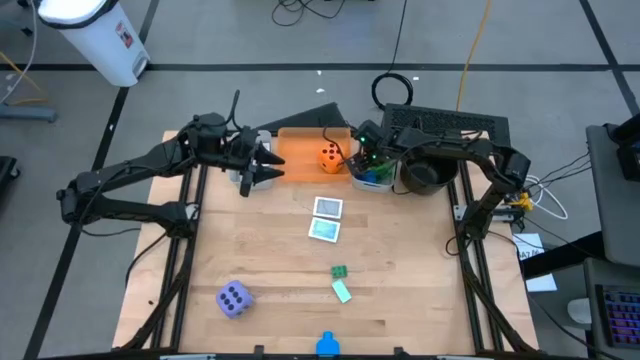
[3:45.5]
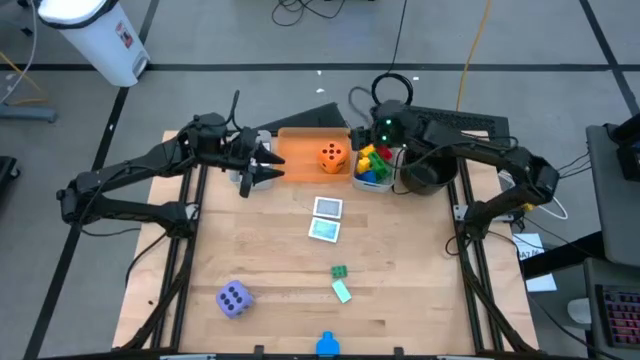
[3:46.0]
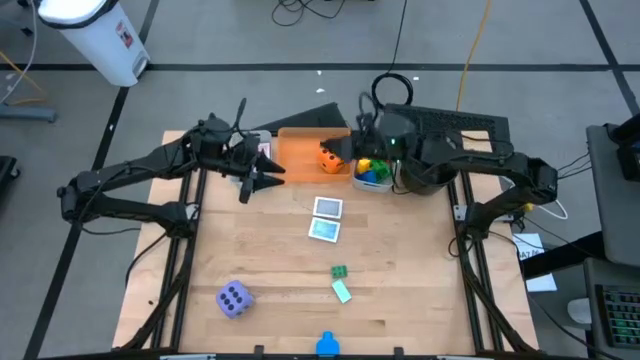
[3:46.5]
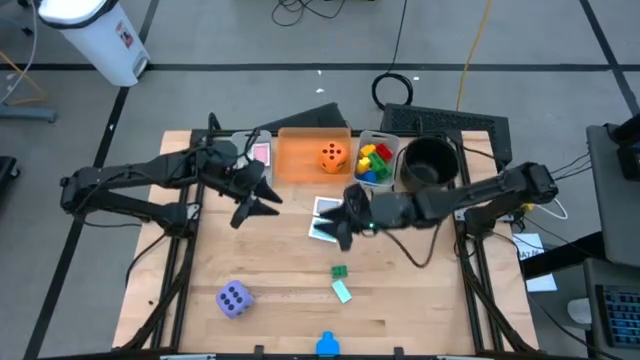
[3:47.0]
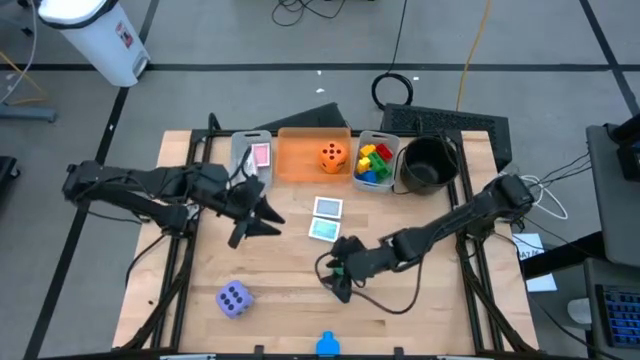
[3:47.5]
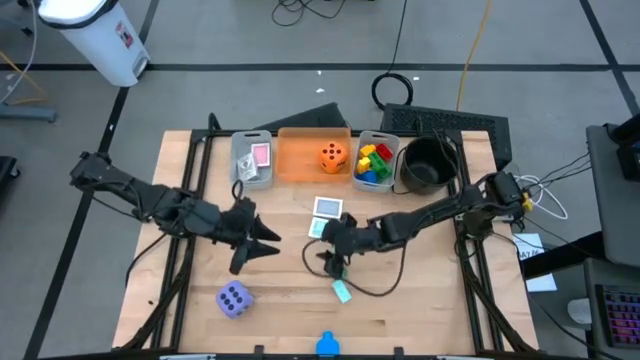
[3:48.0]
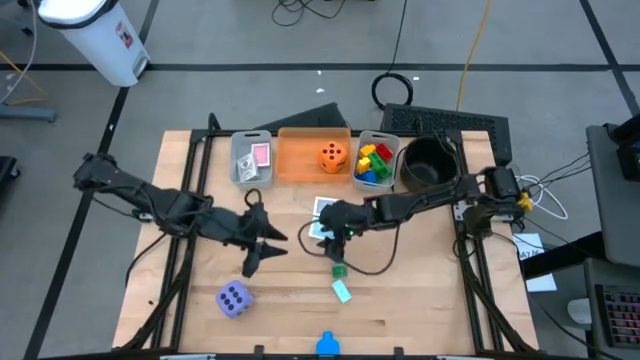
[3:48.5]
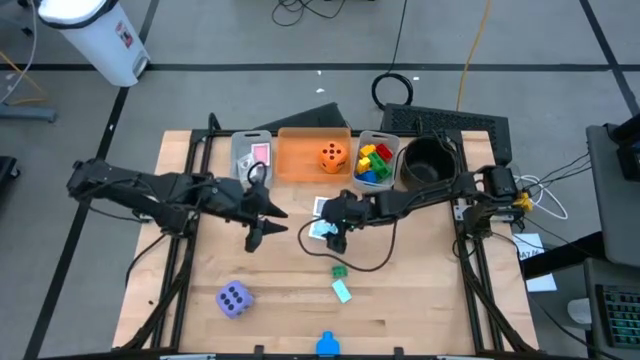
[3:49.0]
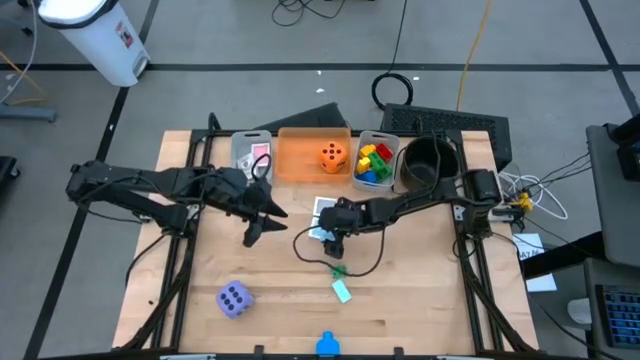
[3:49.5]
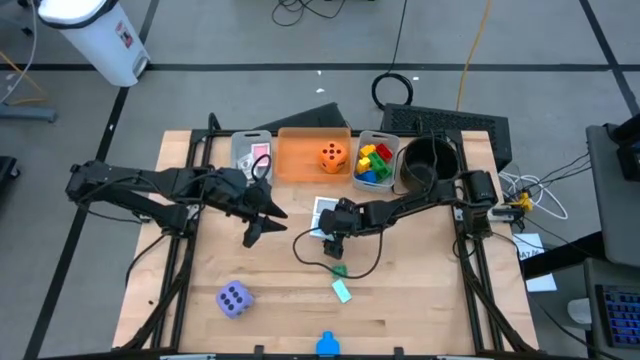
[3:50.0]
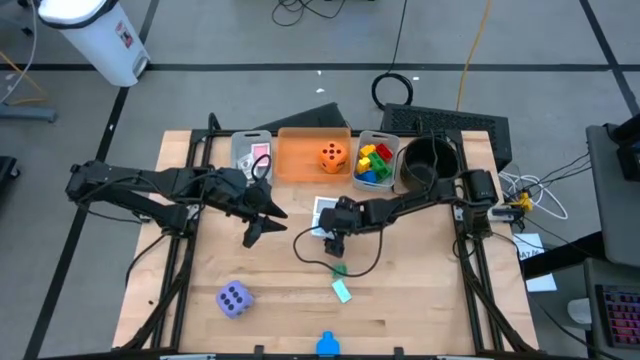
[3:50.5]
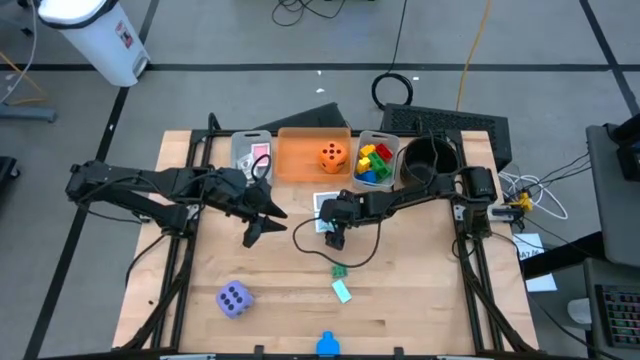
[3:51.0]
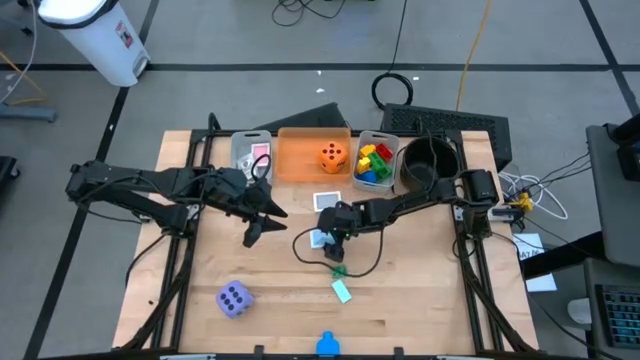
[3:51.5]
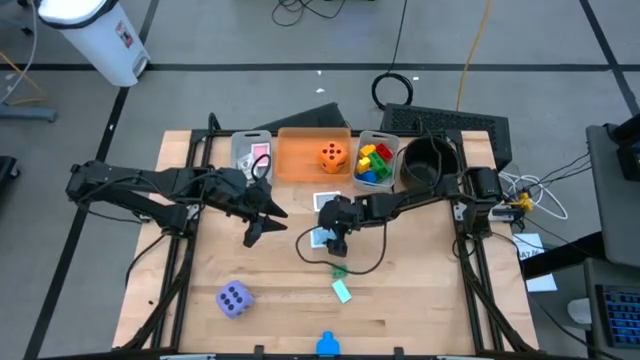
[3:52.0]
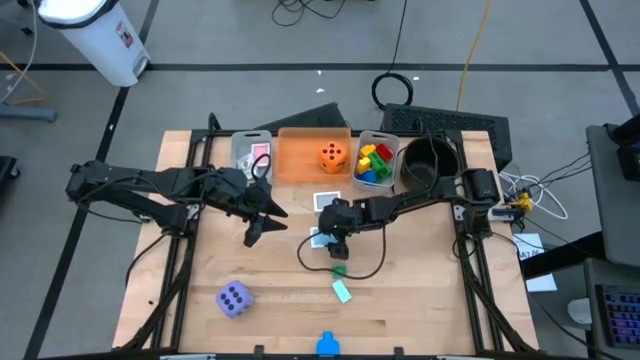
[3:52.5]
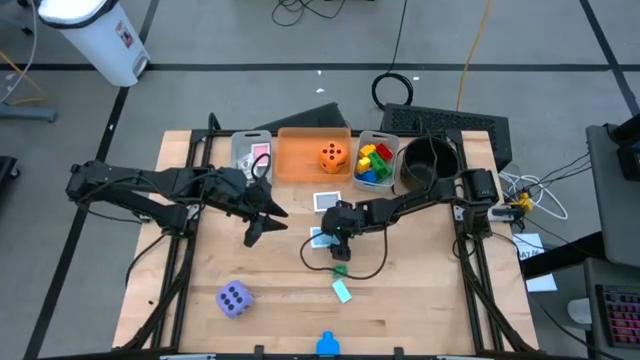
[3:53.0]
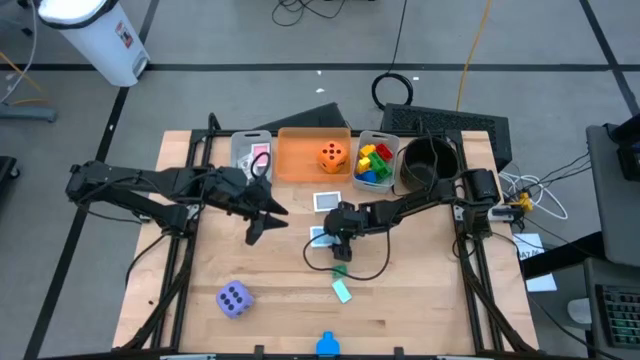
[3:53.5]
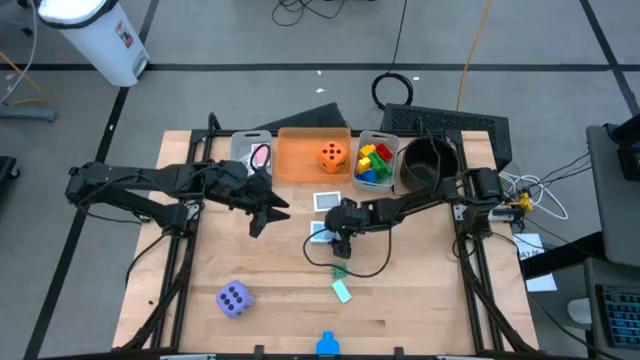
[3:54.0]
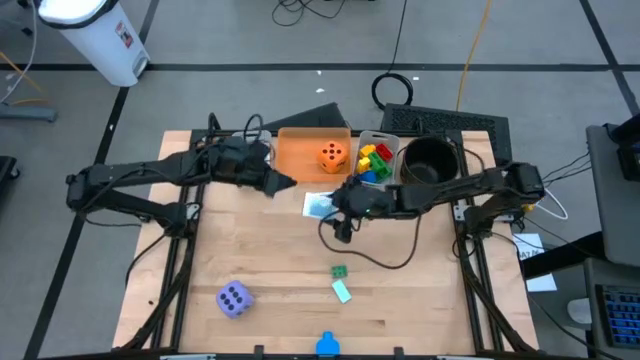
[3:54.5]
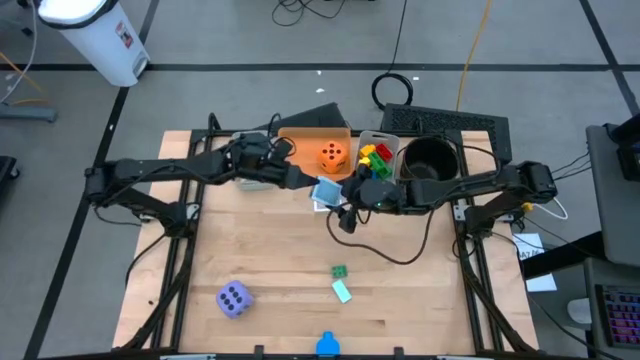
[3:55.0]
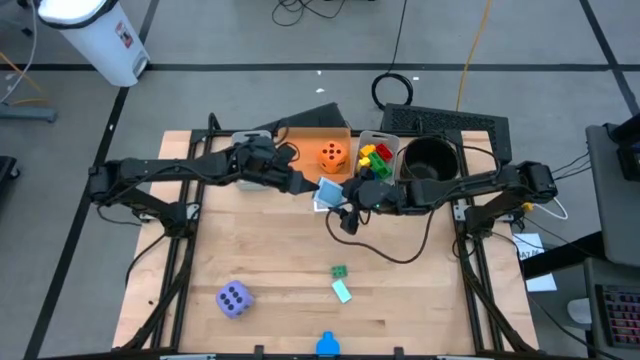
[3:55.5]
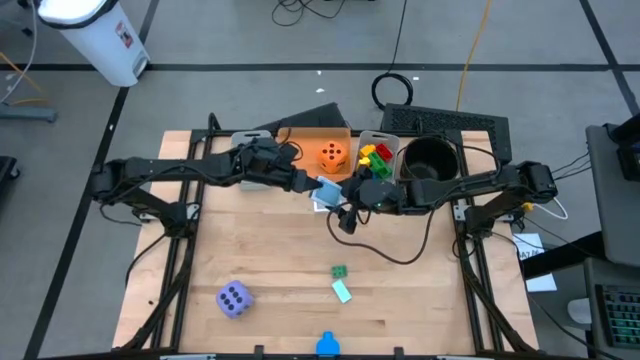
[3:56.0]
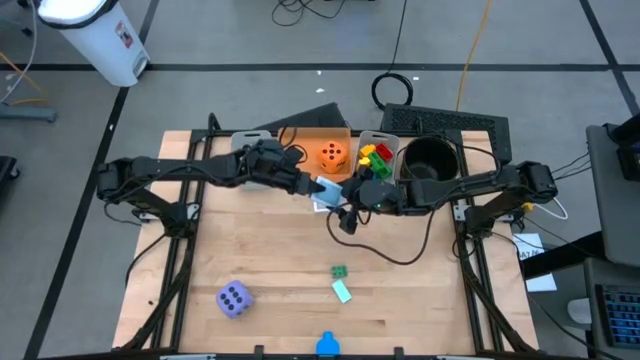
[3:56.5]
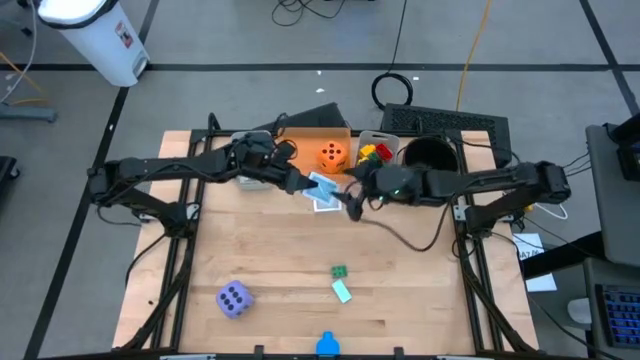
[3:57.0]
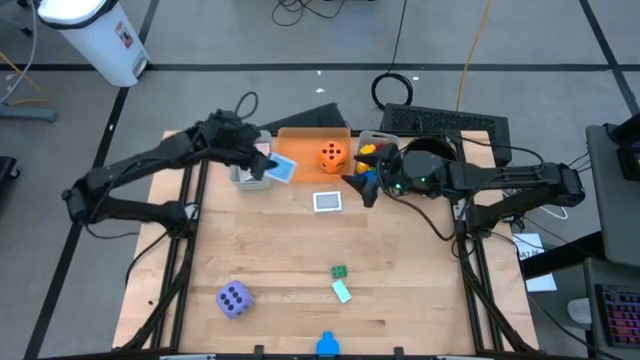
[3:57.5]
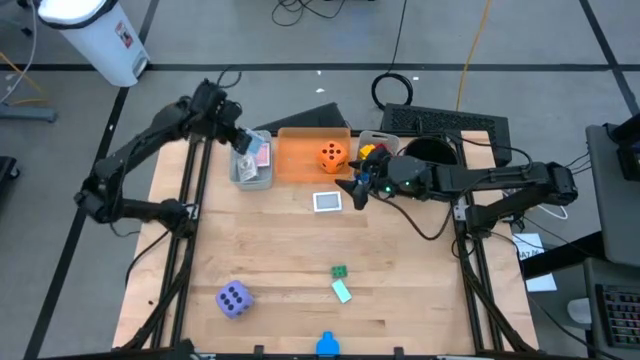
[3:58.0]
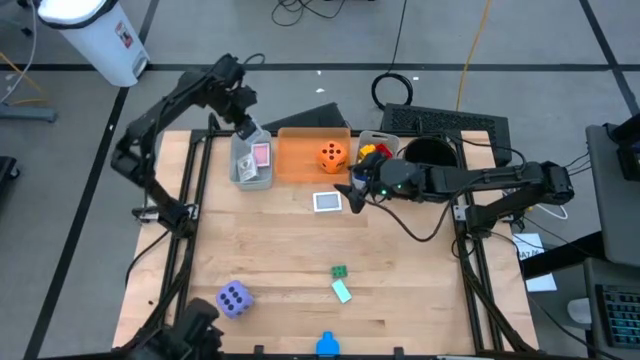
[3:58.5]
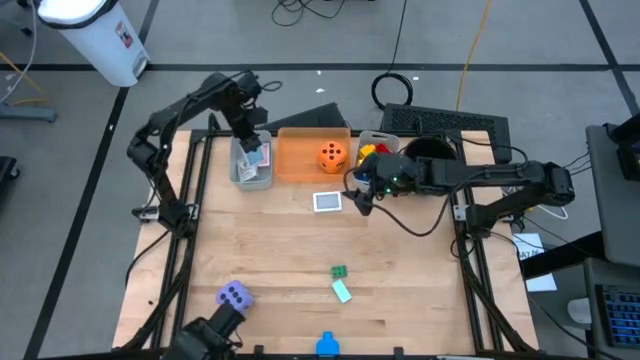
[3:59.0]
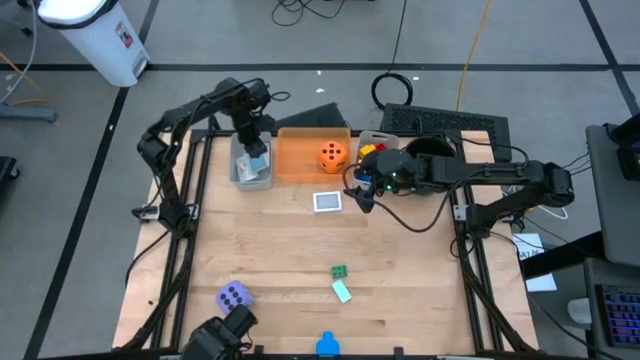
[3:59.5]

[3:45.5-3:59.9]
Task: Pick & Place Toys
Put the blue deck of cards into the left gray bin

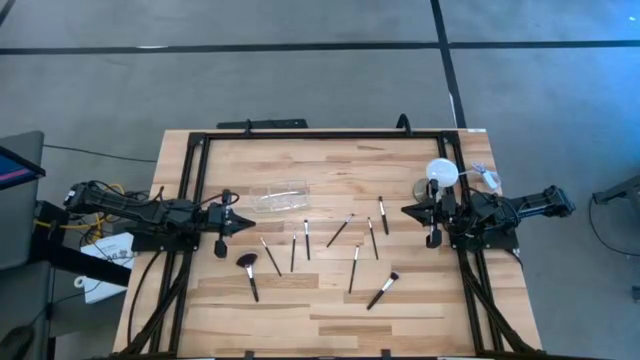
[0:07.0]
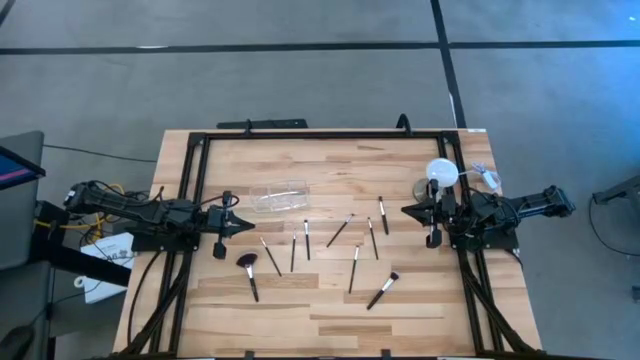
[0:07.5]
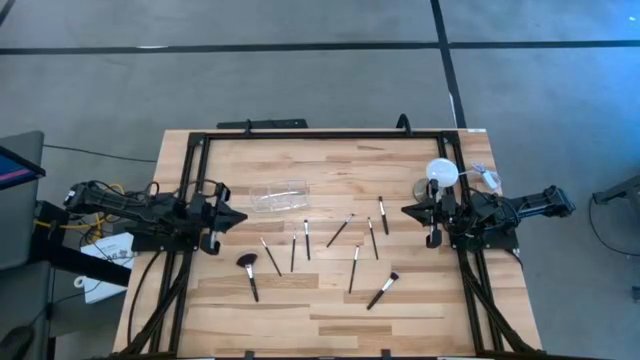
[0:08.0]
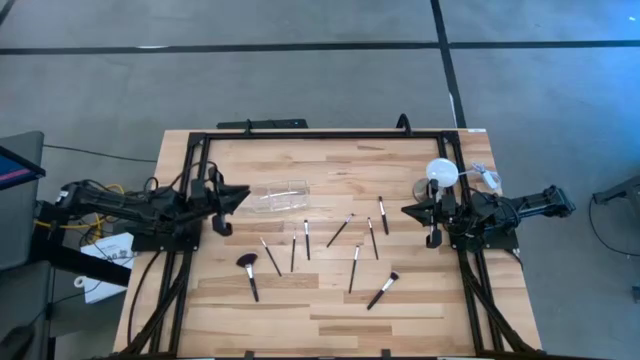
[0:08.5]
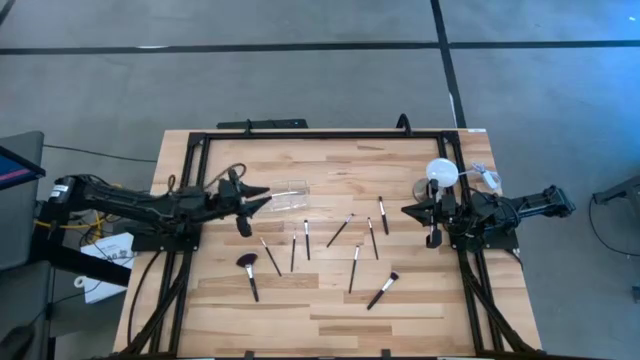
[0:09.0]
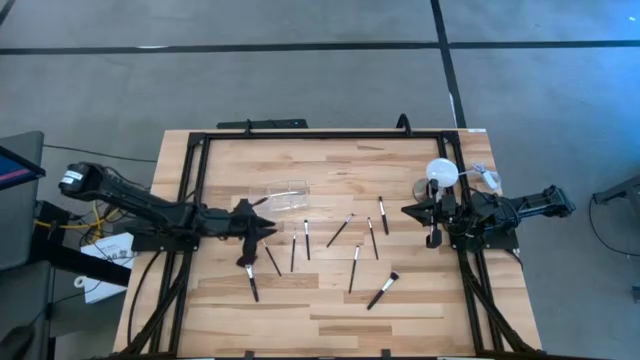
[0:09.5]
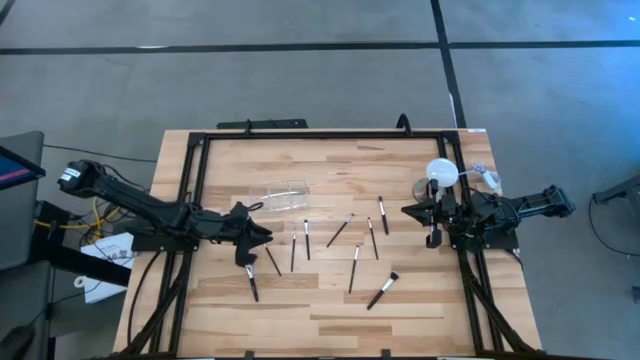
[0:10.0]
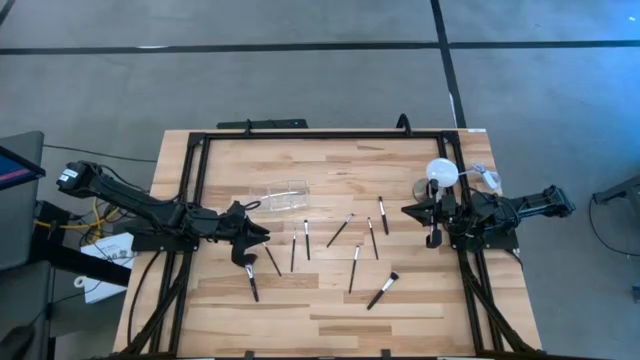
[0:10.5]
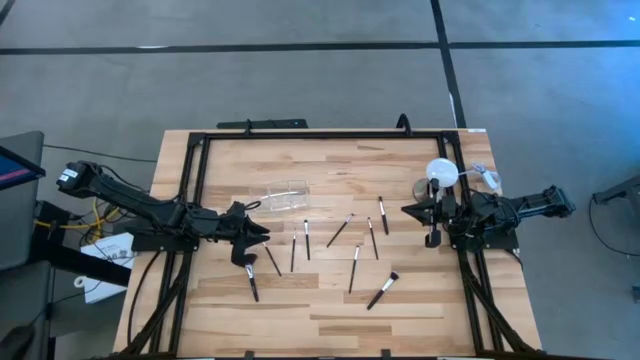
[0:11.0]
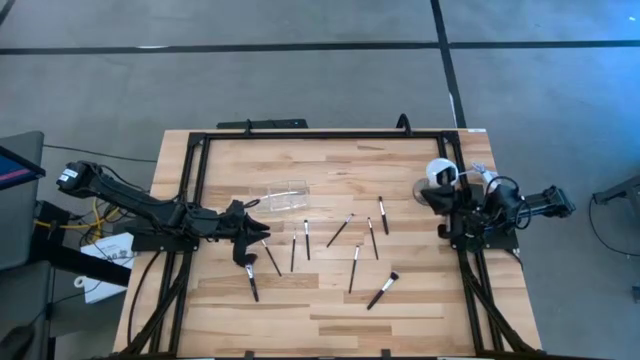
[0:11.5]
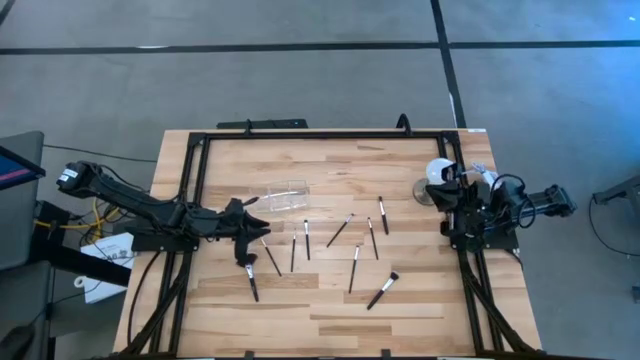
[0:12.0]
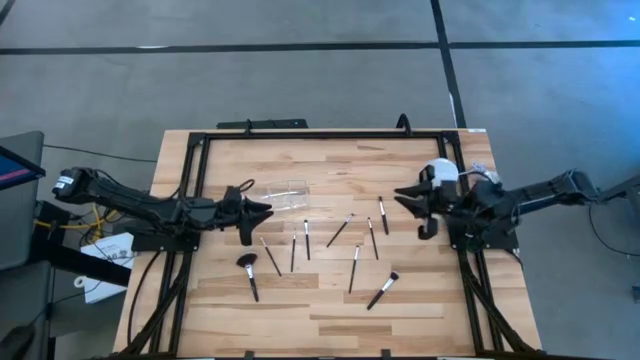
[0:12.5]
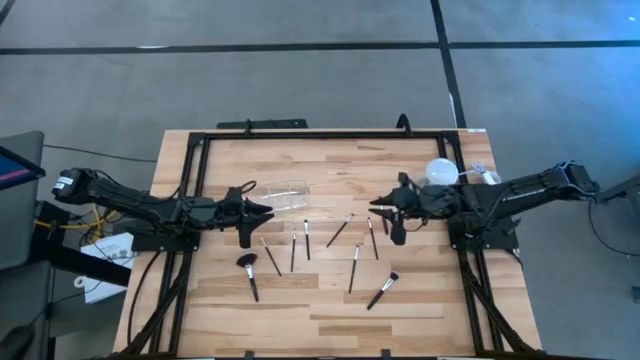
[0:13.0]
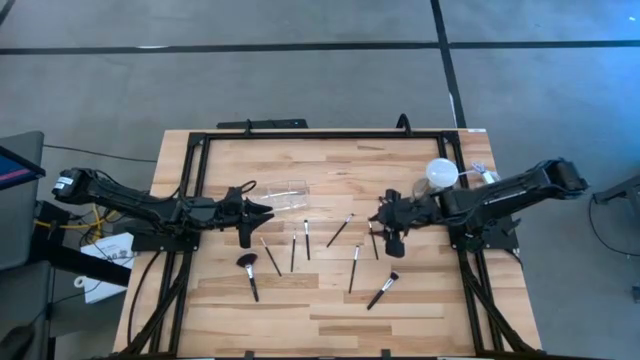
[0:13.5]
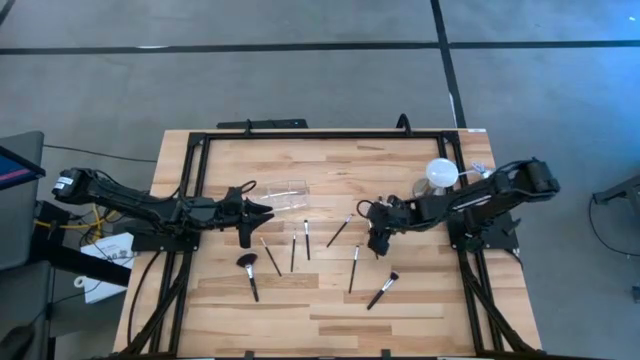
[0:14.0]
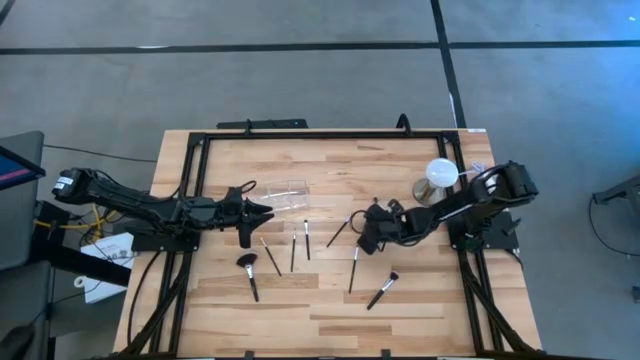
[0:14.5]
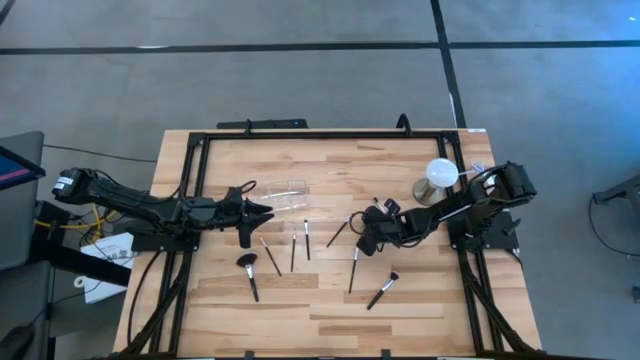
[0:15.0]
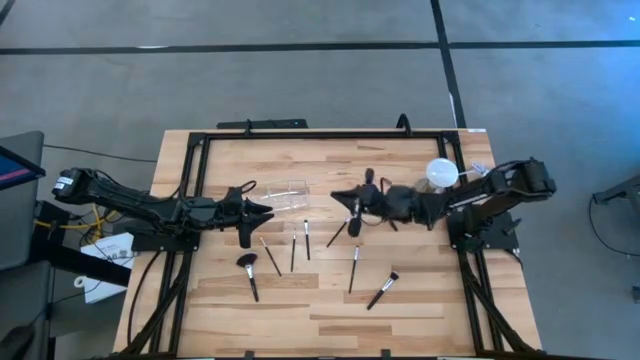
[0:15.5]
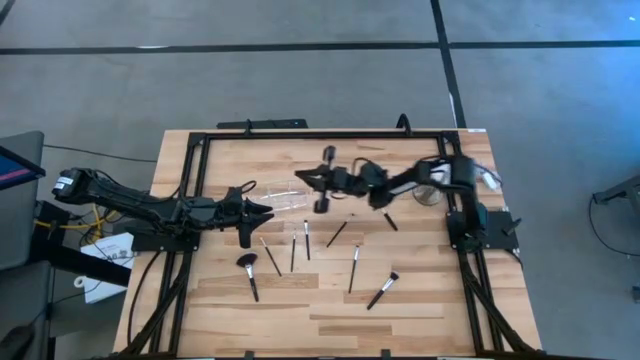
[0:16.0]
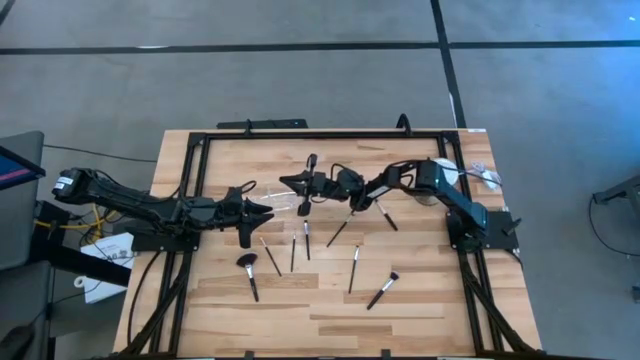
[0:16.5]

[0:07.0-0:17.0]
Task: Put items in baskets/containers
Put the eyeshadow brush into the transparent organizer
